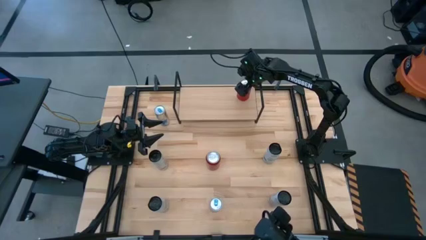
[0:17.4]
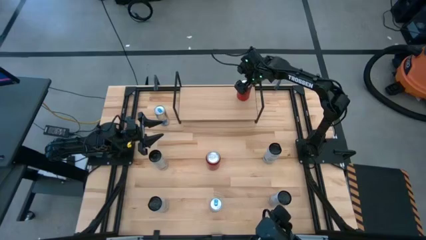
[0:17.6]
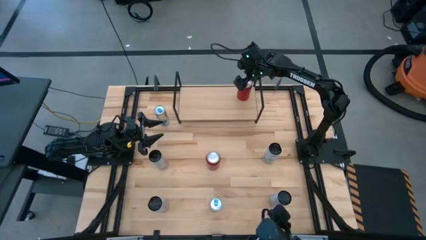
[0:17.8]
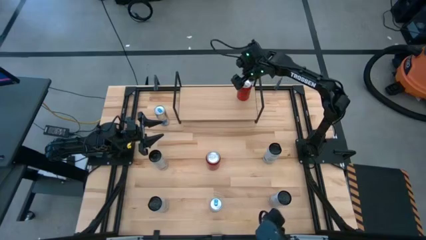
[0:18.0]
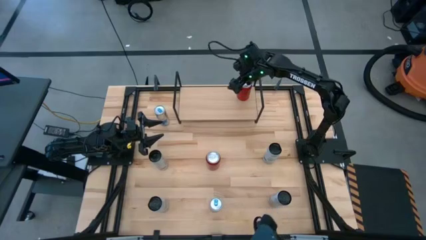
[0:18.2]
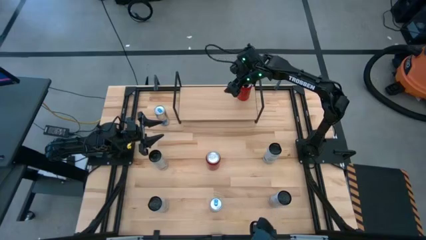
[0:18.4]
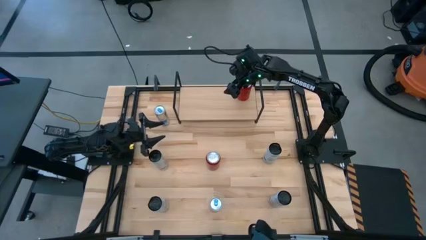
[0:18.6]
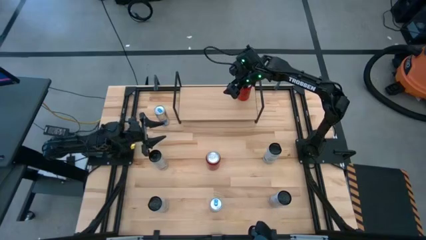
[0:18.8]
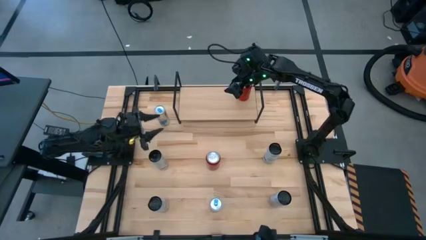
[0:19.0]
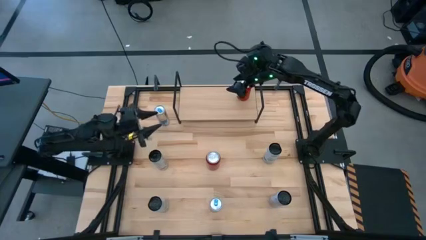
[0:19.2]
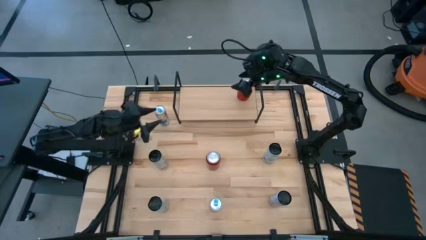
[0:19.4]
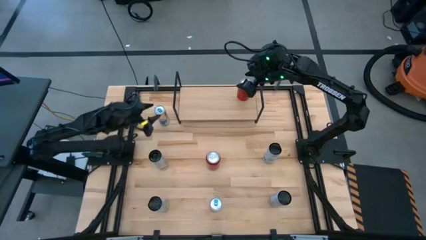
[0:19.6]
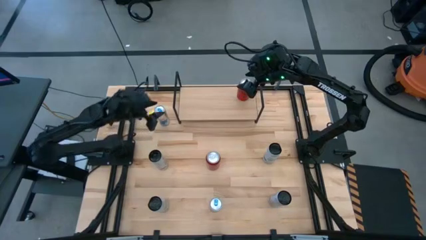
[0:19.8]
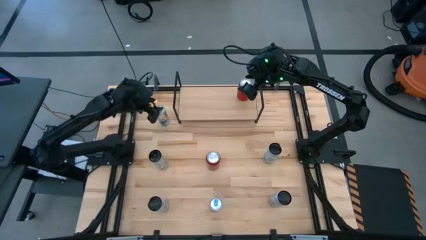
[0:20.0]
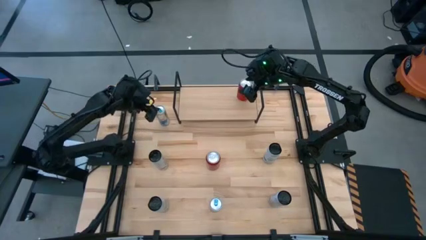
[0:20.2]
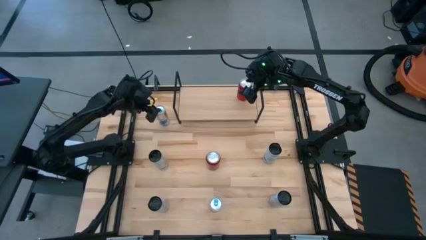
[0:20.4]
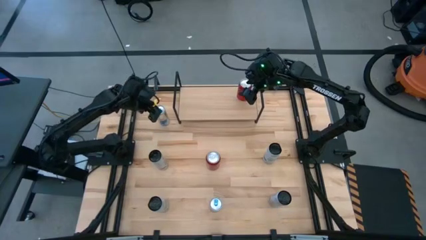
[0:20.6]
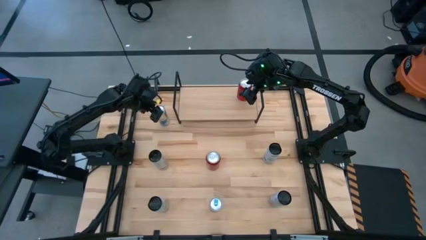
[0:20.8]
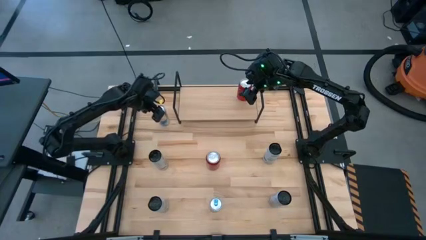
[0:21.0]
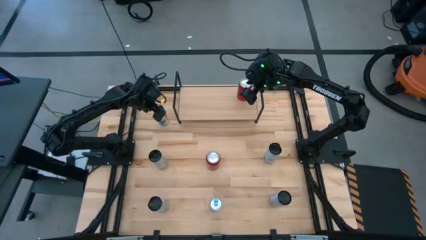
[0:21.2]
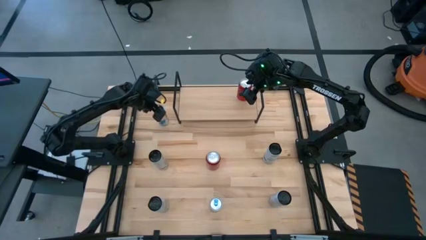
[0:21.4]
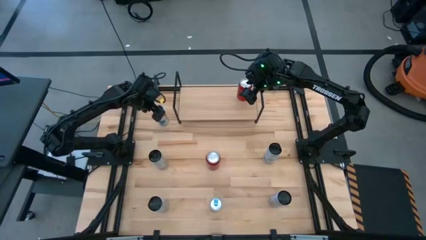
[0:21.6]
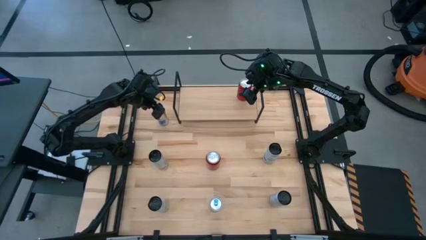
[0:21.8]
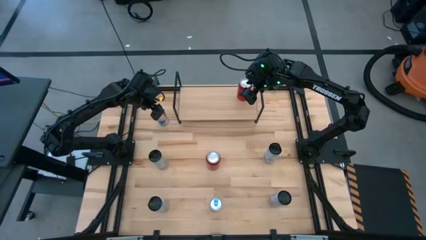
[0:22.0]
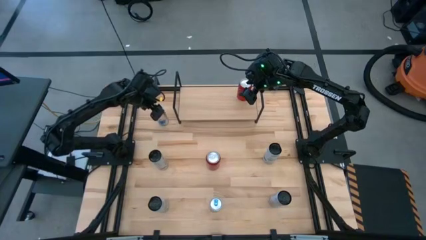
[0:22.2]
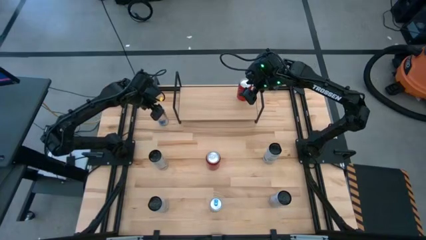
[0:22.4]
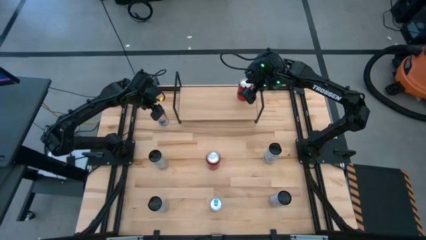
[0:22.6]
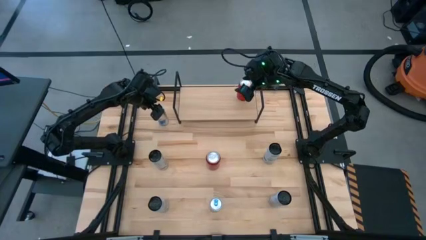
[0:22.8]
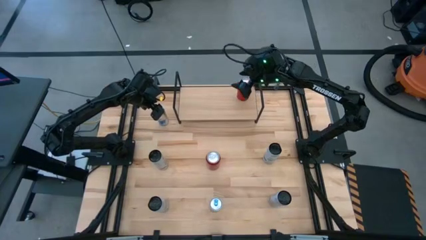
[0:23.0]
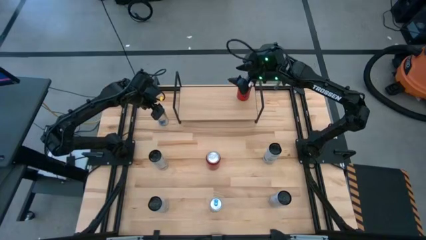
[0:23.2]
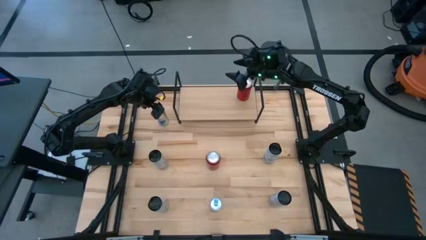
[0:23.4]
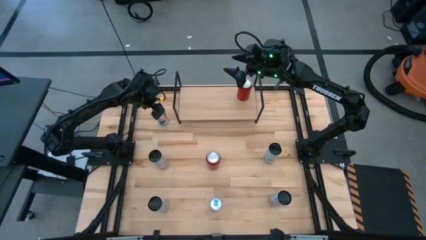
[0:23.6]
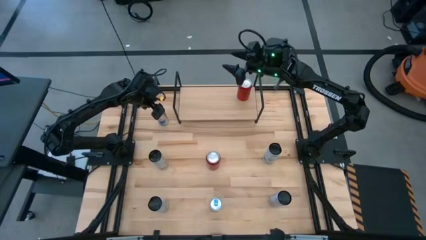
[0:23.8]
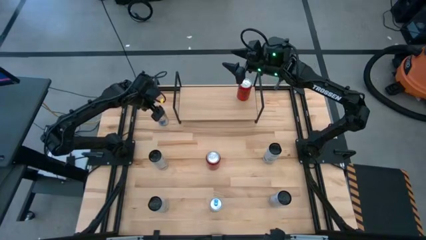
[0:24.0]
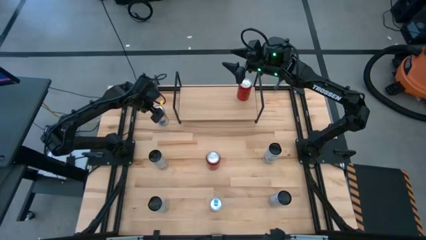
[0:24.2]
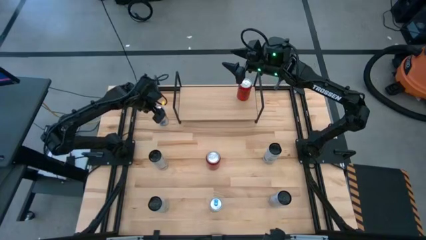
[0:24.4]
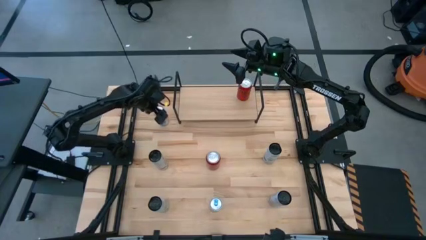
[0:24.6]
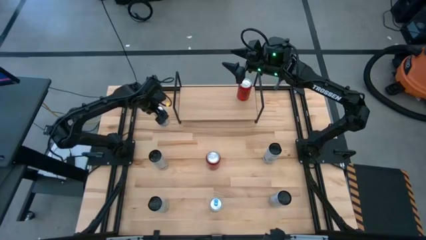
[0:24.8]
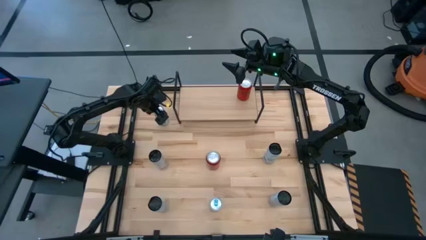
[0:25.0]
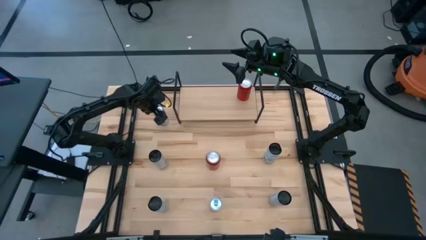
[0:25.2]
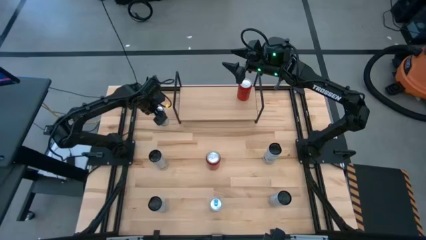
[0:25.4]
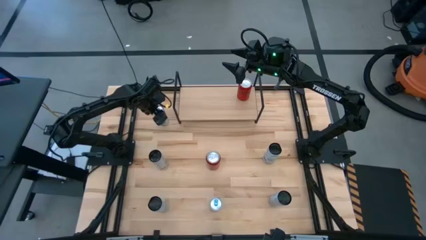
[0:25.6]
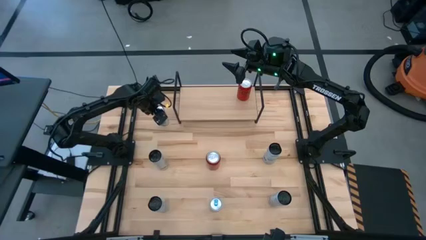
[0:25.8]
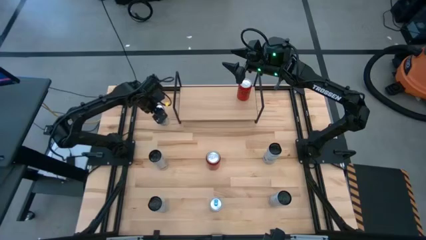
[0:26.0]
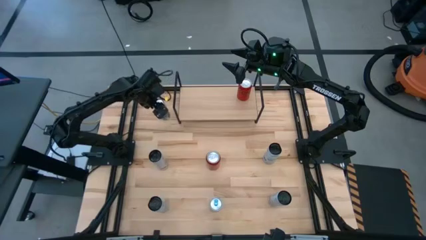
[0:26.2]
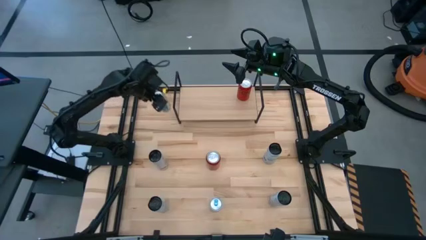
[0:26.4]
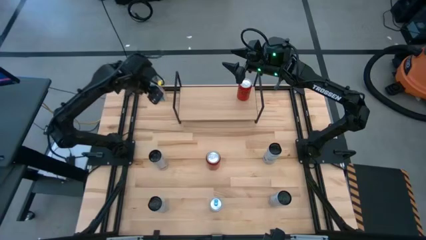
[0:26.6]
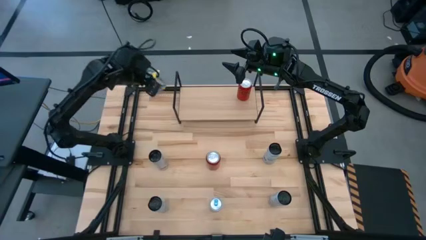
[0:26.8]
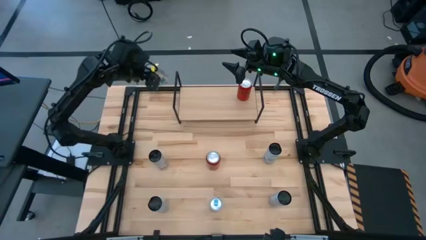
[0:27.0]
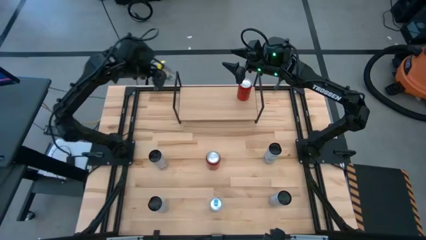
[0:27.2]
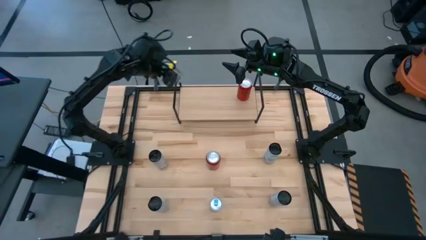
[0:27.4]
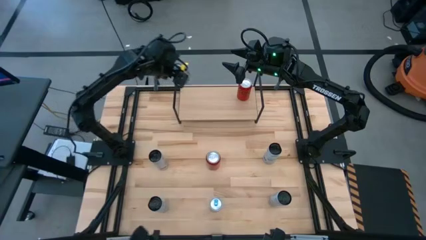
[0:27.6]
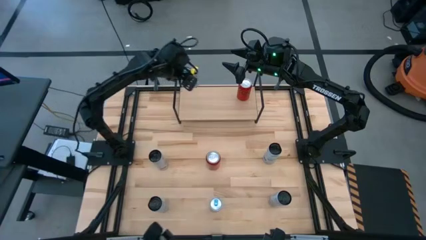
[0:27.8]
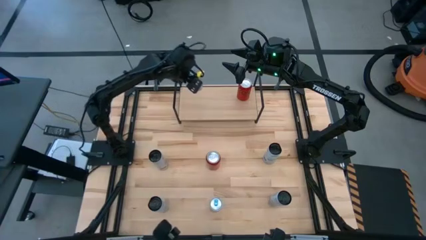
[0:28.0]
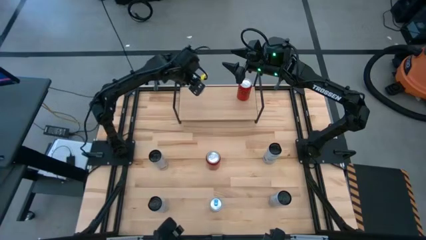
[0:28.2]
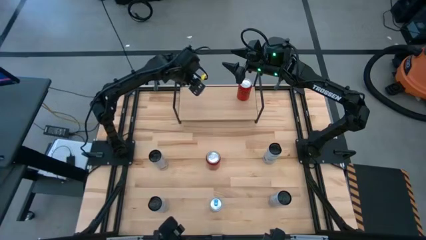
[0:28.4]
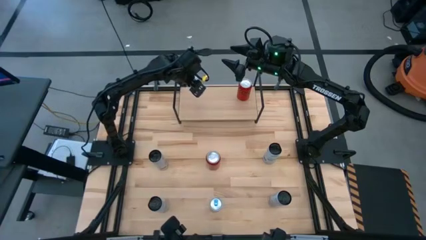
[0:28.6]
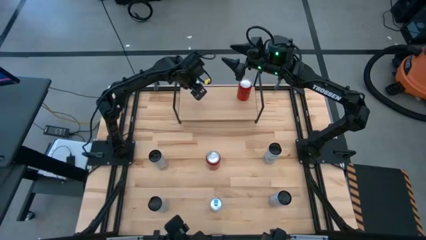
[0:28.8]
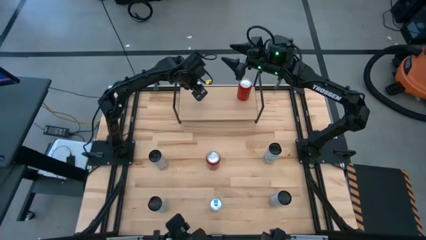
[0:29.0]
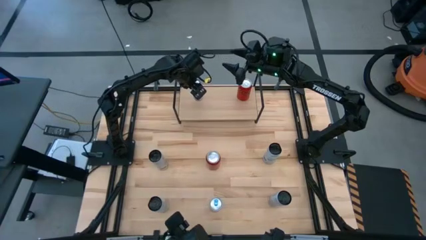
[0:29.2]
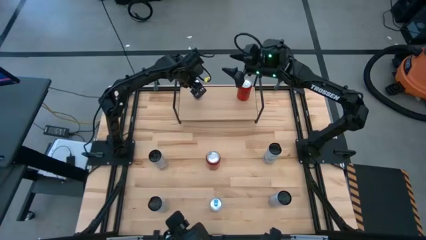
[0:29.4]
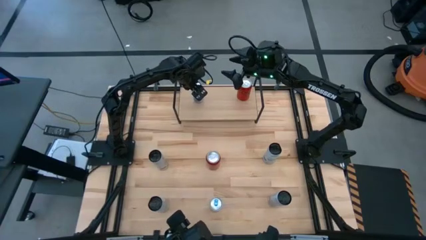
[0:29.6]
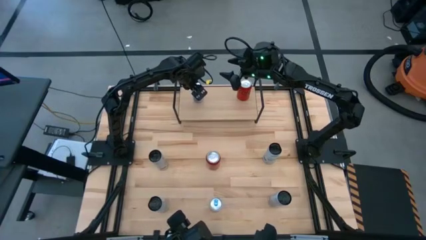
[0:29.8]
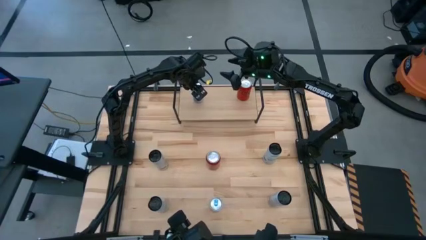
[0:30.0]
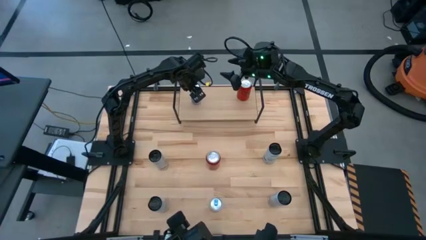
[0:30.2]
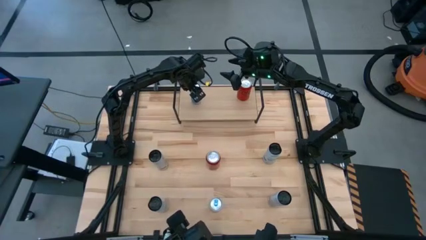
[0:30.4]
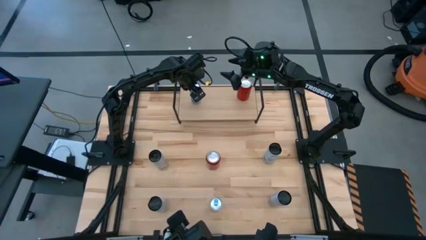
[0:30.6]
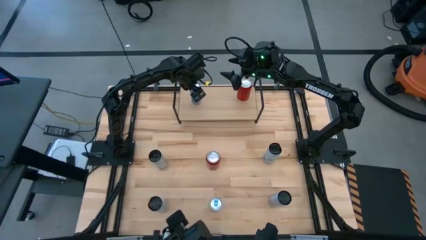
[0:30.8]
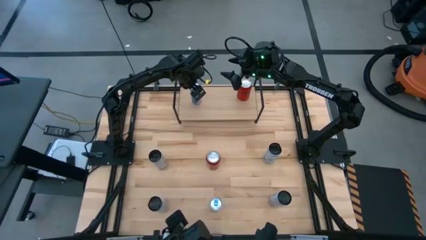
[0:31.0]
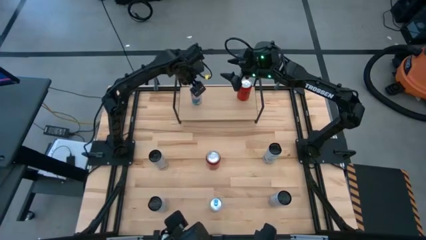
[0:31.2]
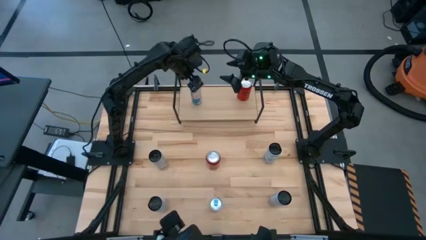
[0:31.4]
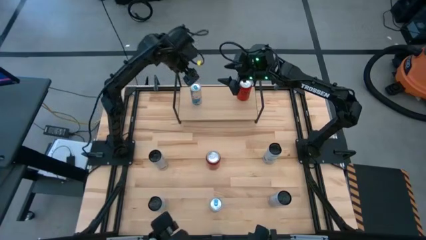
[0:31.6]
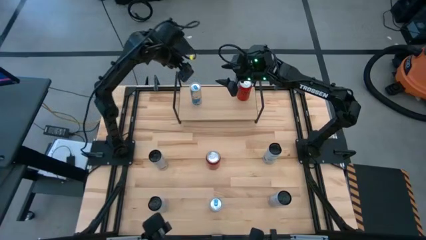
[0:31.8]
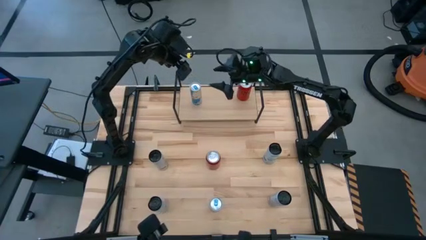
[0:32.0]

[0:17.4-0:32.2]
Task: Place canned beverage on shelf
Put the top blue soda can on the shelf

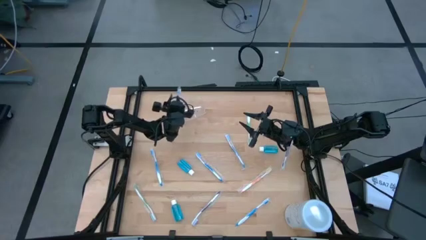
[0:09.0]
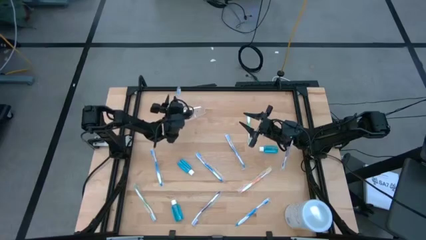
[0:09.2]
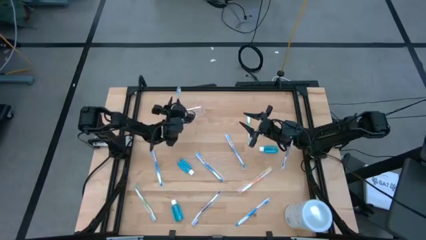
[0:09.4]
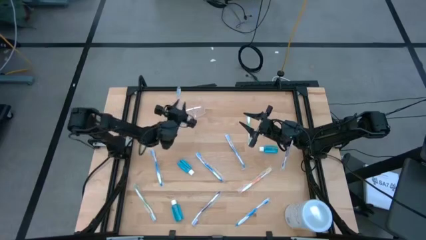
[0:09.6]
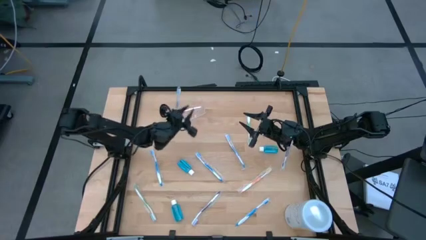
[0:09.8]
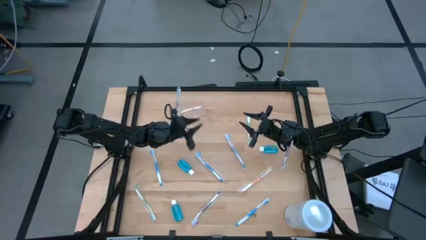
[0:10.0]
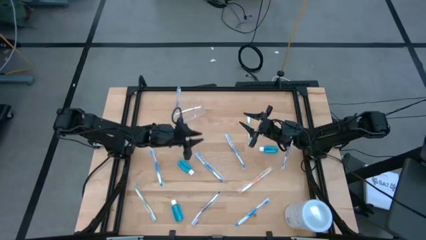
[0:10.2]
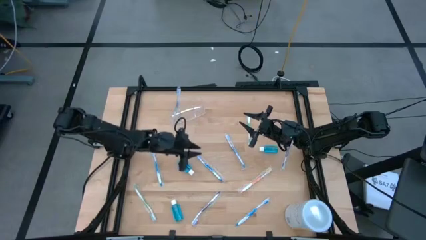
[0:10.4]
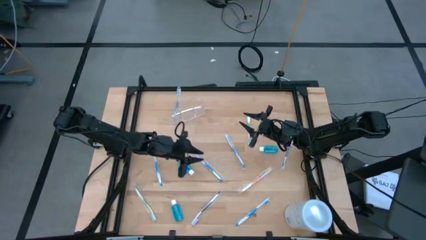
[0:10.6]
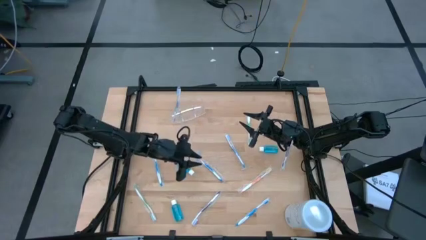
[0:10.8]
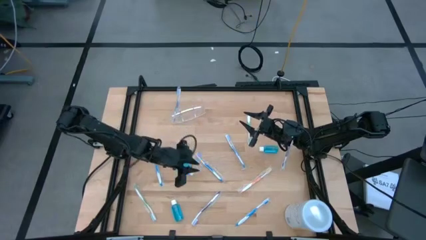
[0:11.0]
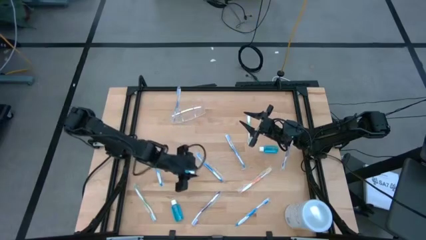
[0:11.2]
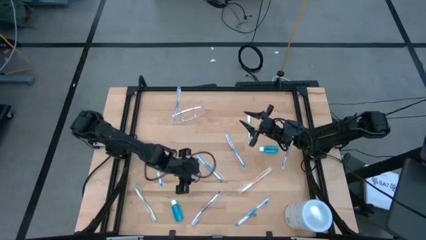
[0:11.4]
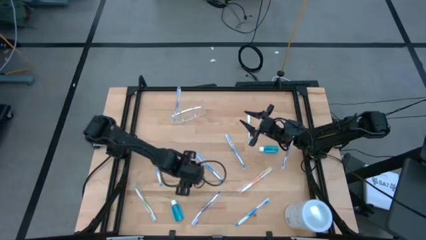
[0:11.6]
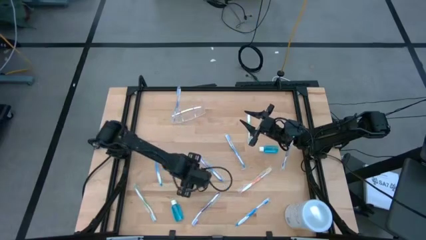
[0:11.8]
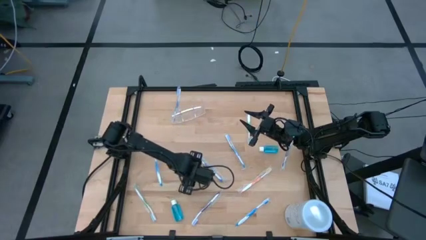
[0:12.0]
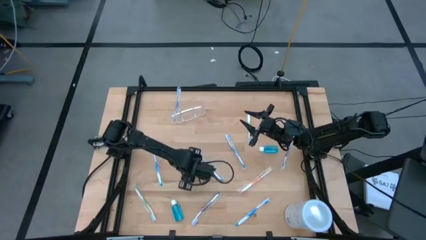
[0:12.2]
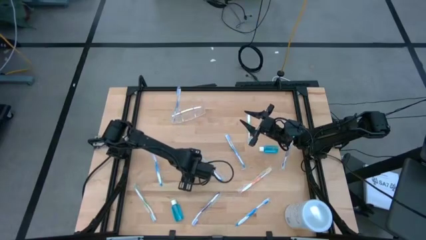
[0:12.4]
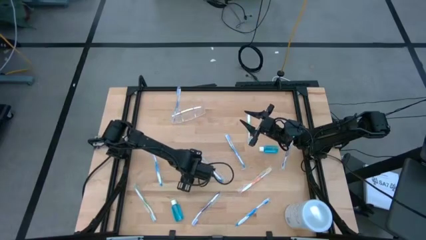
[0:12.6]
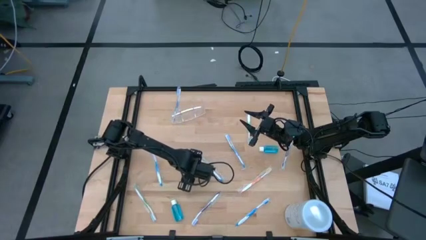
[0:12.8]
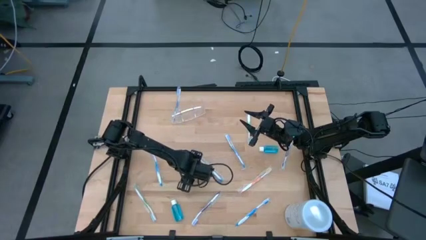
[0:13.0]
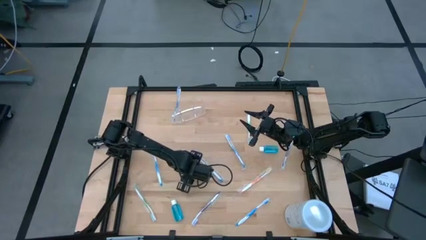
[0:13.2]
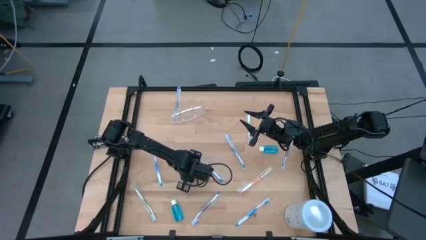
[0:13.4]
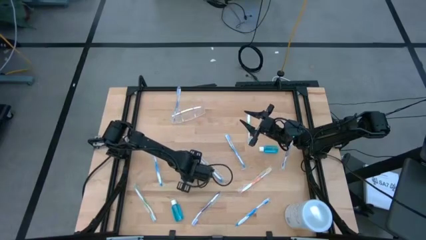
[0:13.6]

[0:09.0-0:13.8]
Task: Pick & Place toothbrushing station
Put the middle small blue bottle into the transparent organizer
